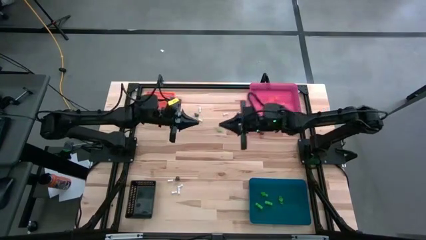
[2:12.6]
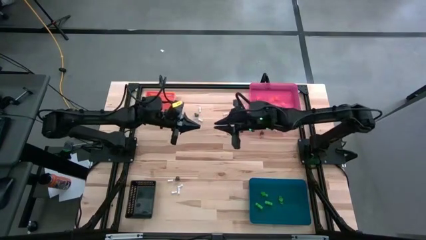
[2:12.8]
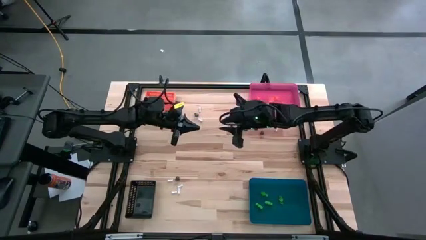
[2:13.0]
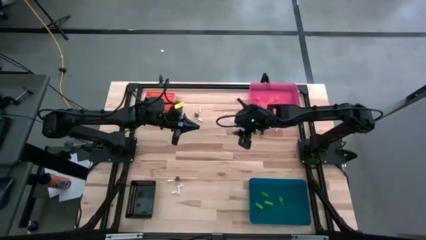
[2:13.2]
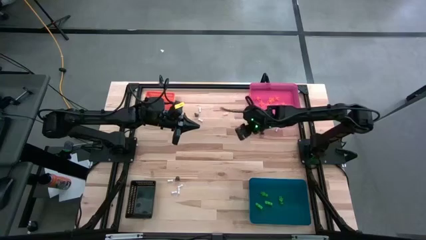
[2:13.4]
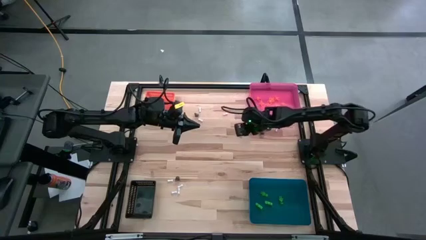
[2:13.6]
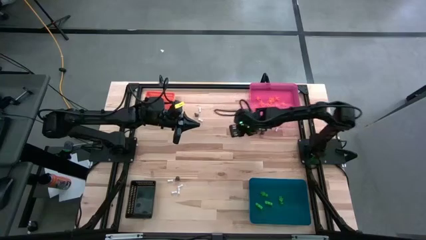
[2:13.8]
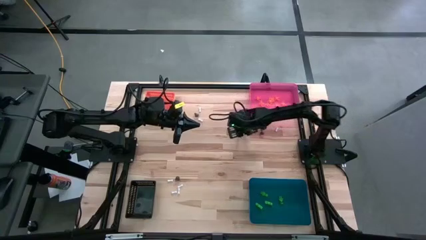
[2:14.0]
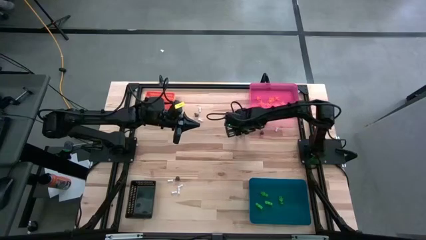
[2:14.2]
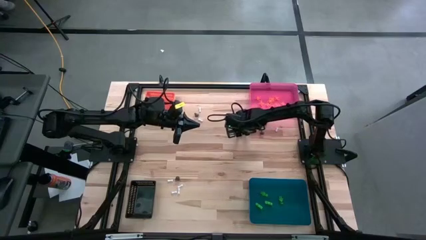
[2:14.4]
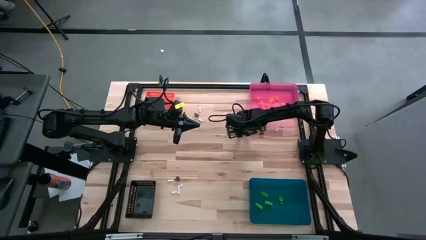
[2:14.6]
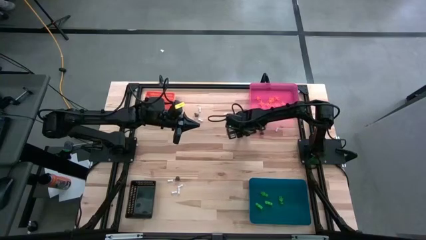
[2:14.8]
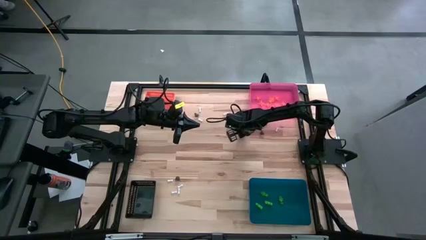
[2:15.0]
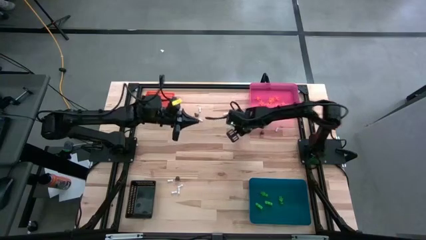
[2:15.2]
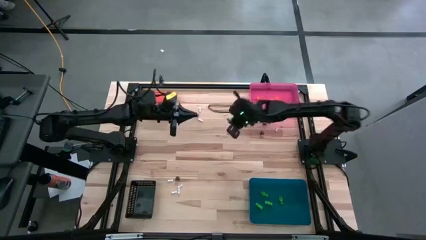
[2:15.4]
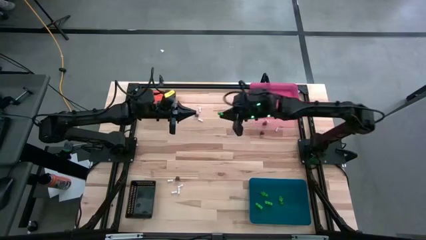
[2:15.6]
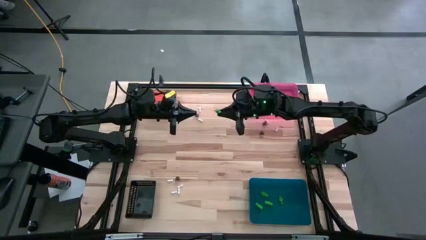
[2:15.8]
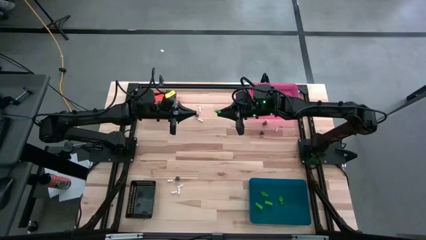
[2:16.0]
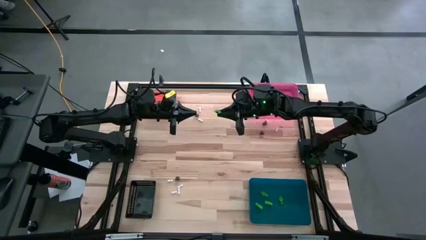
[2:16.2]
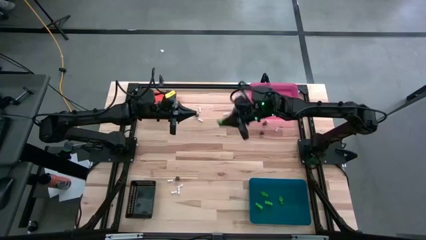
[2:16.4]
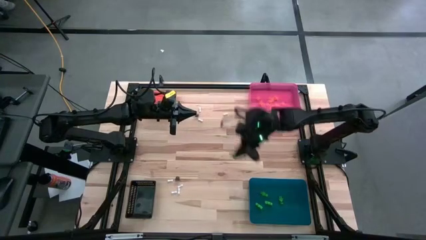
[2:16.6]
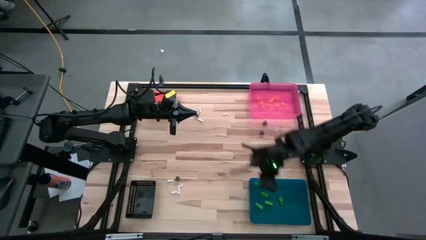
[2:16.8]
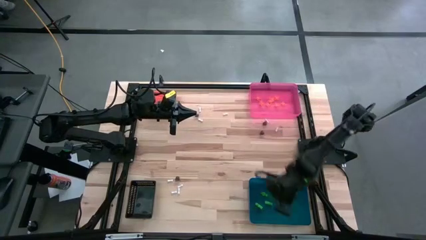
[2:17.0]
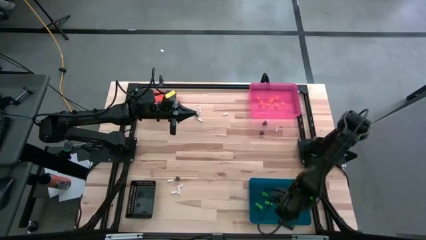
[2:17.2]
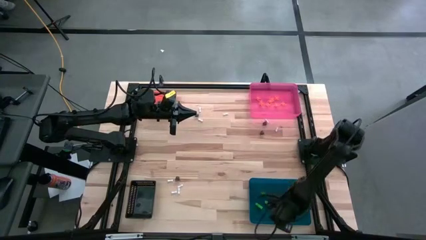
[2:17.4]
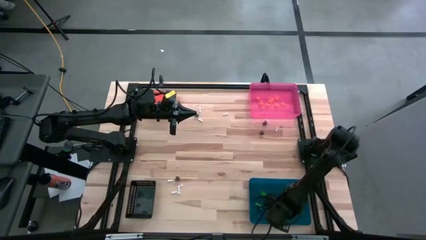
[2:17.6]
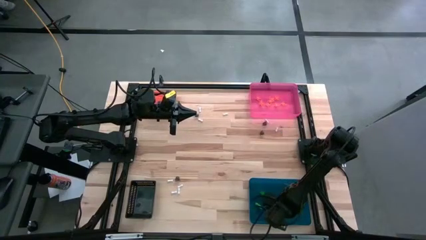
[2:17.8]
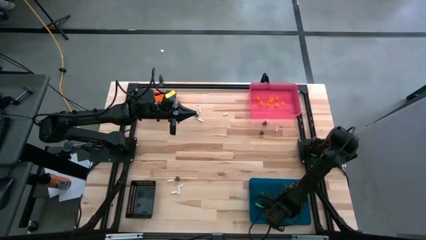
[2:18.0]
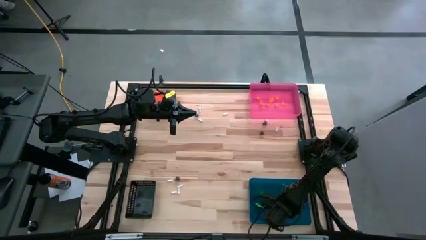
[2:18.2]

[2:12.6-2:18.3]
Task: Sort Halloween decoration
Put the green skeleton toy into the blue bin

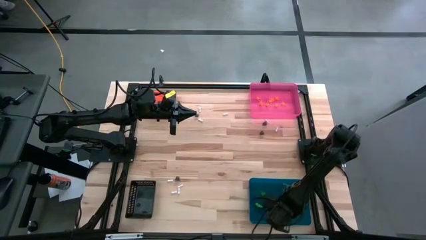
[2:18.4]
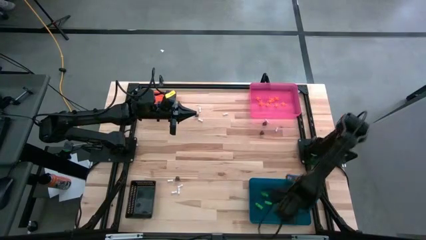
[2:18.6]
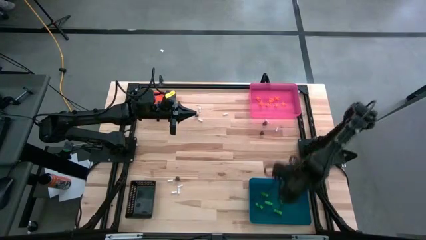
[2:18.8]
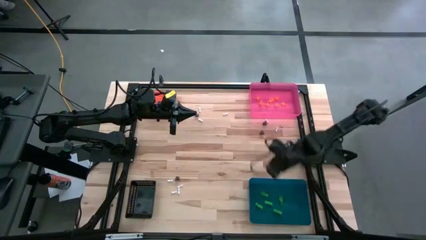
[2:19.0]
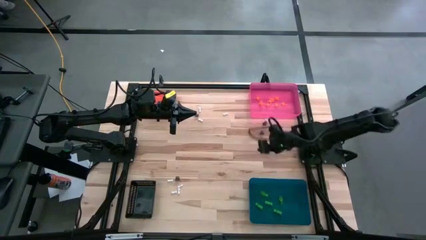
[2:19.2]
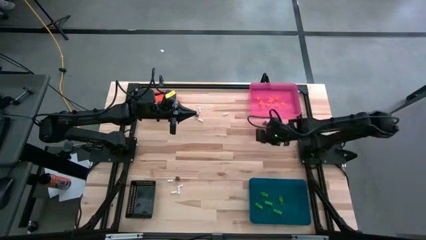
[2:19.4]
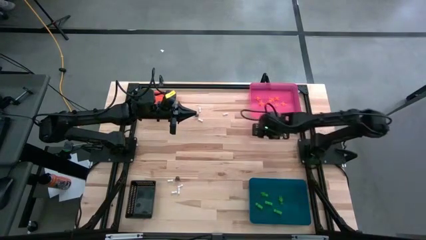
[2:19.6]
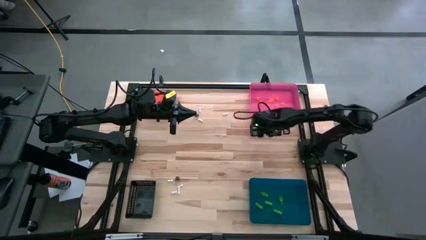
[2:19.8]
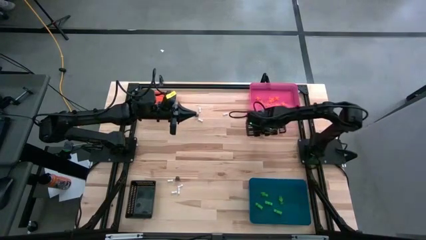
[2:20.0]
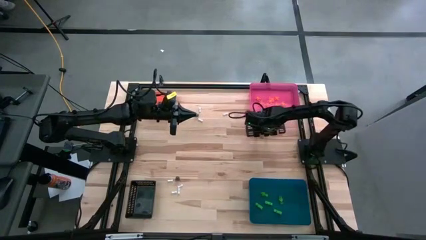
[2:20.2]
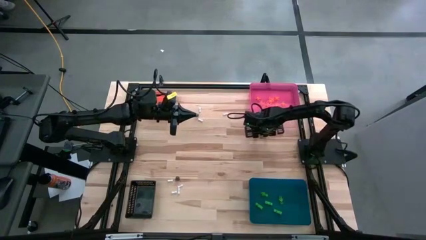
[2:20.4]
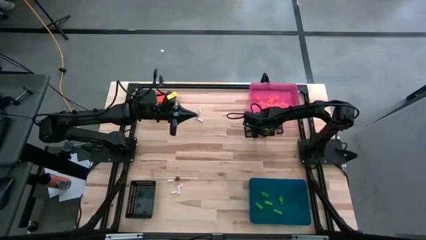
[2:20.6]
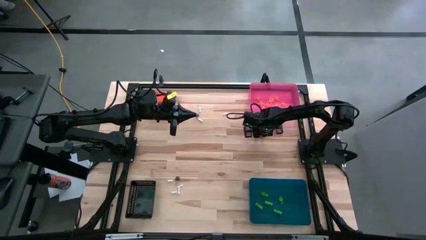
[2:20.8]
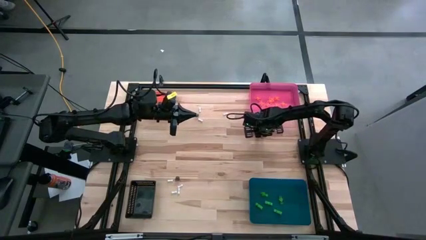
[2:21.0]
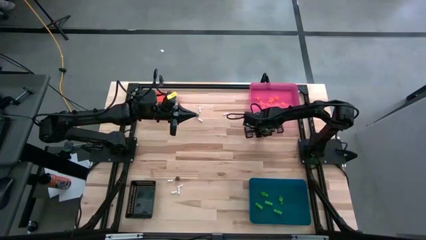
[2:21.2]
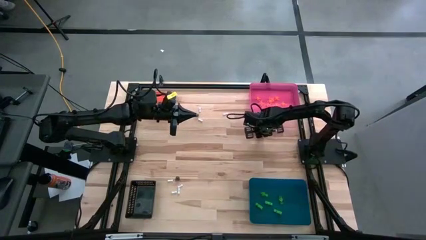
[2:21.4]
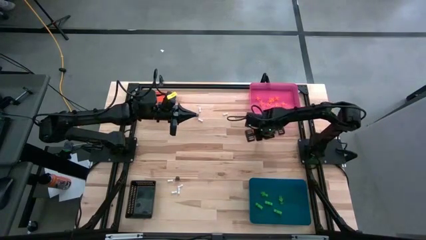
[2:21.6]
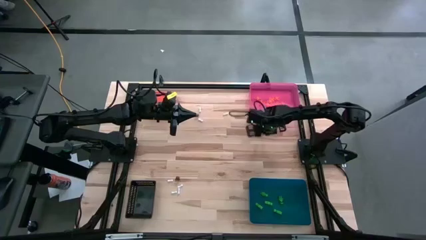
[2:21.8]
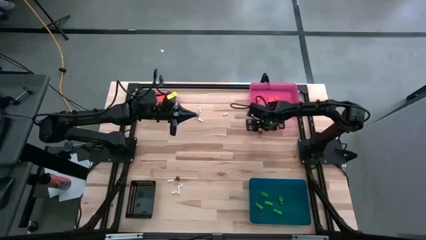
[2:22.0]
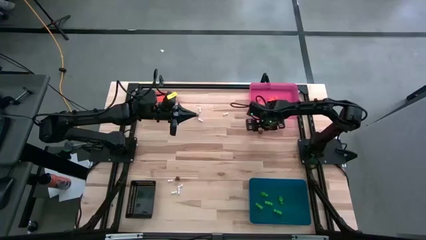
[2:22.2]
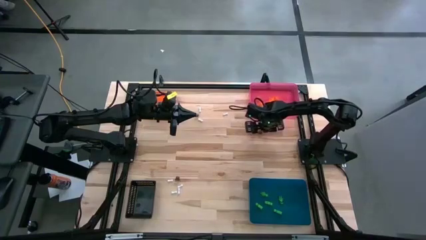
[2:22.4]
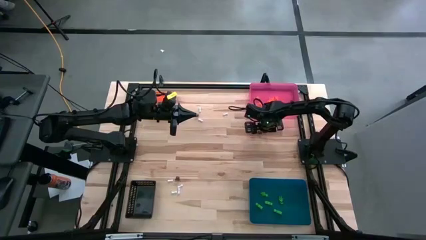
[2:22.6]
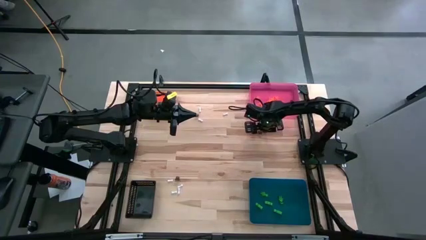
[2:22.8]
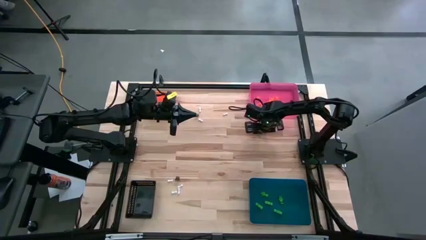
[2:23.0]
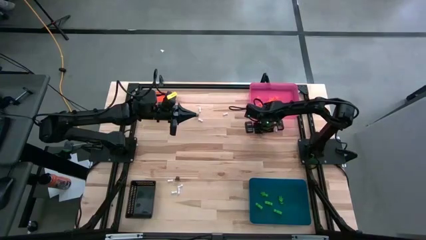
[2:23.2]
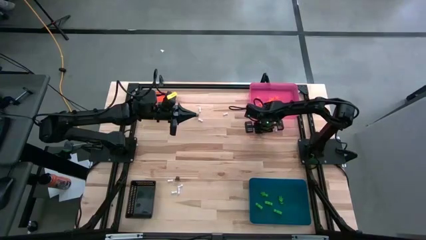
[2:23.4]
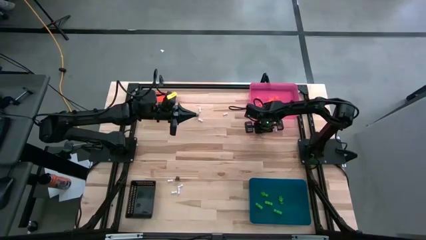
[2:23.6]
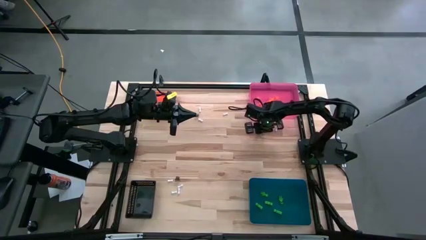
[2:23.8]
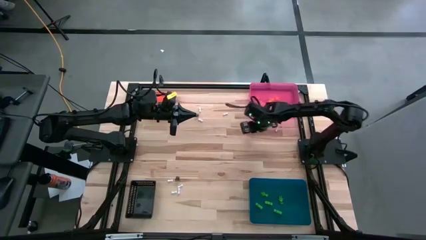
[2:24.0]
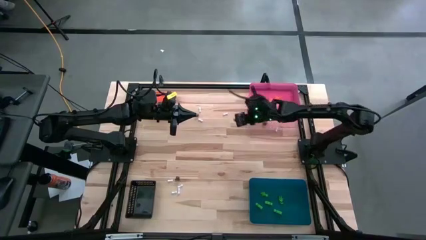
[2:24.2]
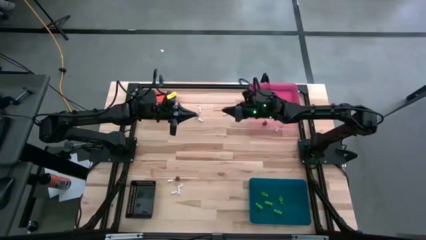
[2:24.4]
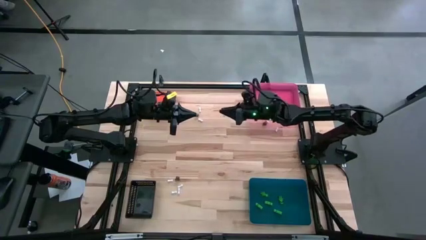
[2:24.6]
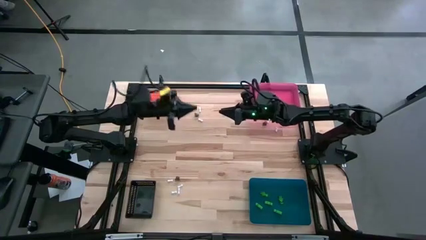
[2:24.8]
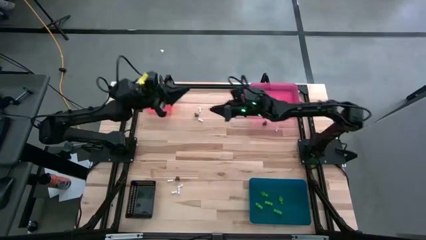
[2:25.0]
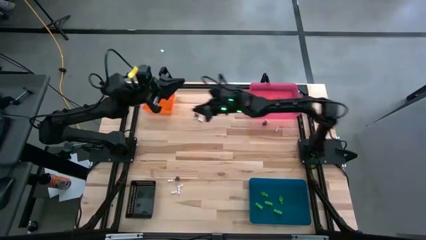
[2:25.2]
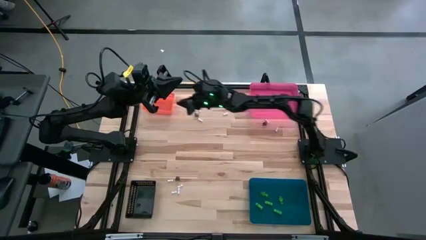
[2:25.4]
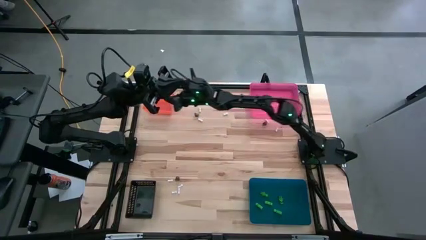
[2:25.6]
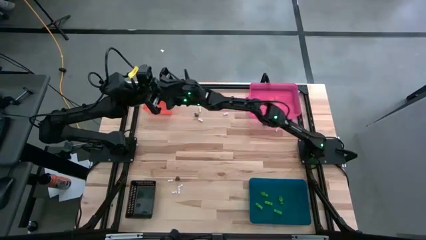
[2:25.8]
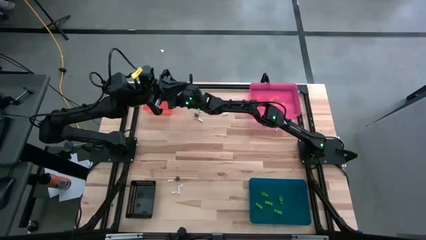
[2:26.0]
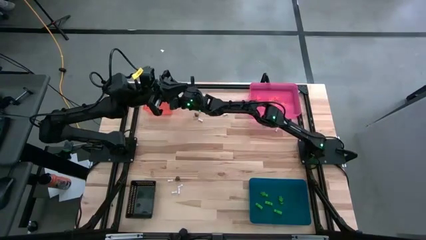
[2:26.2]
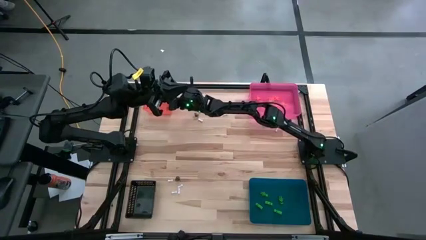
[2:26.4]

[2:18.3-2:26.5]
Put the black skull toy into the orange bin

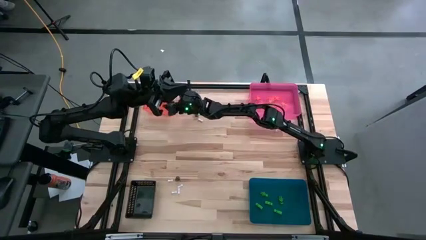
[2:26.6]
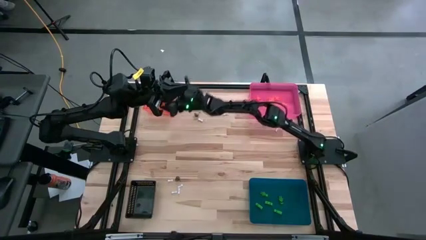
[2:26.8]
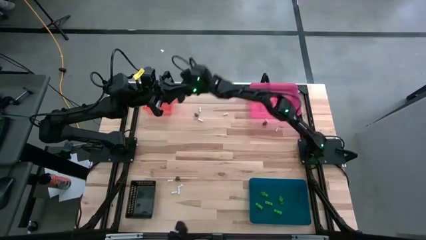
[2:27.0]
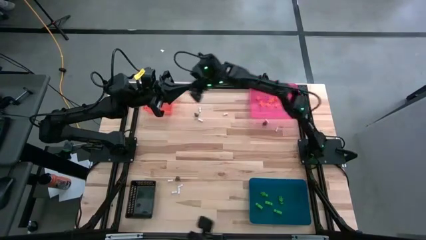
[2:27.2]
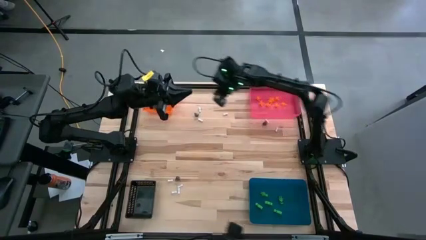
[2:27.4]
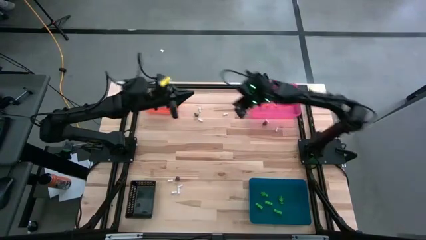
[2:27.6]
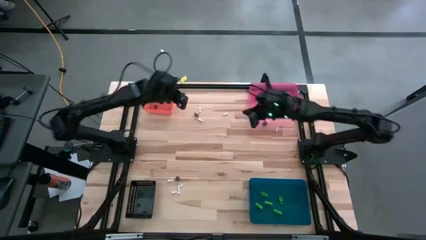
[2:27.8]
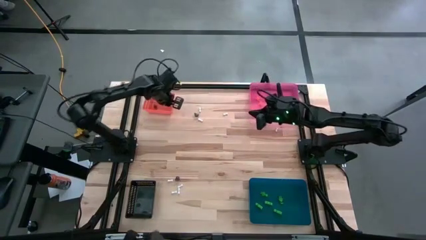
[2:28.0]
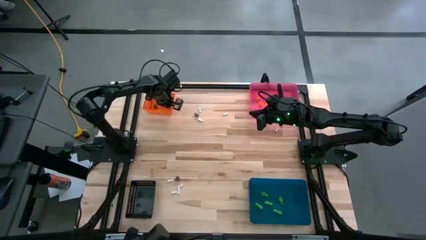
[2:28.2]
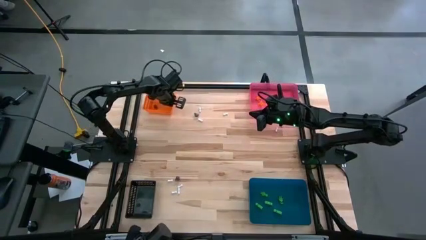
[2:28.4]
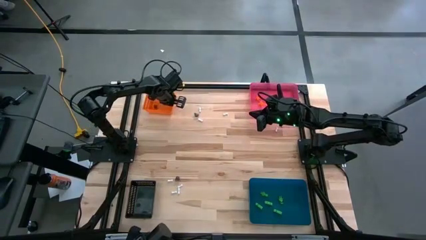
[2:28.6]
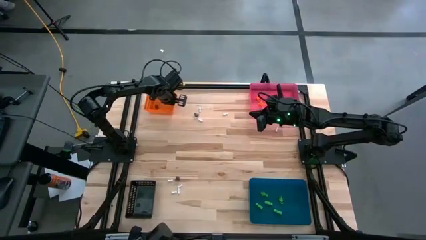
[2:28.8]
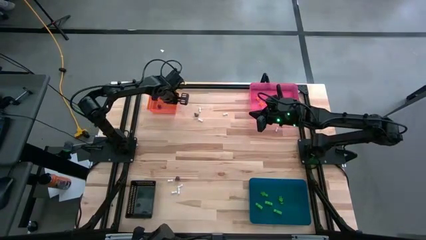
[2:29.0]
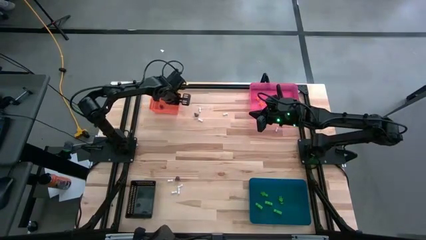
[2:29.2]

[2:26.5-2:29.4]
Adjust the orange bin on the table
